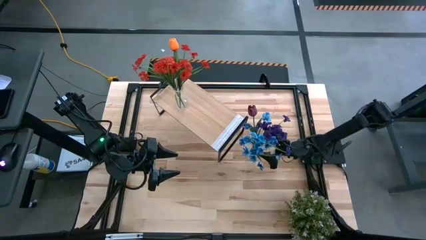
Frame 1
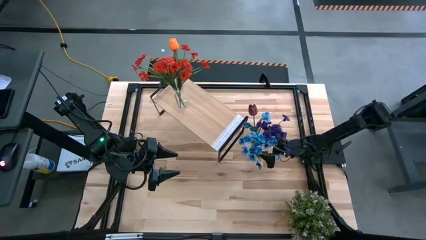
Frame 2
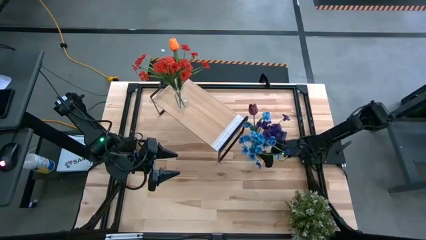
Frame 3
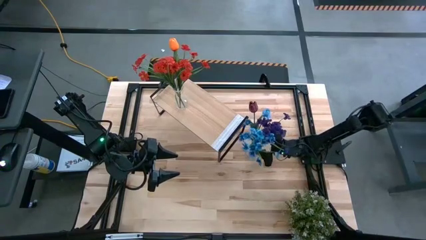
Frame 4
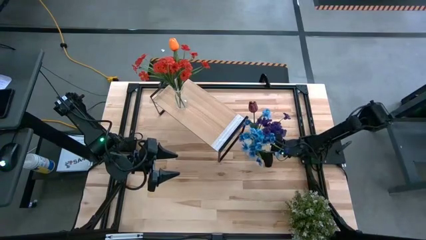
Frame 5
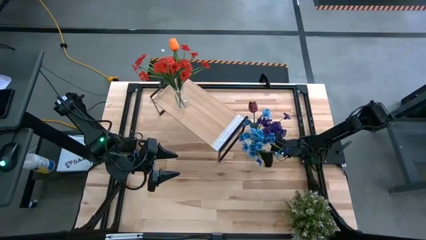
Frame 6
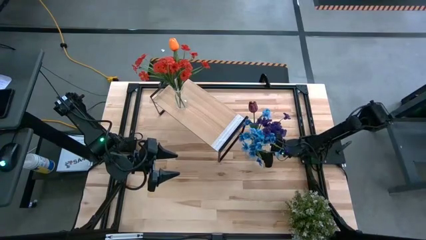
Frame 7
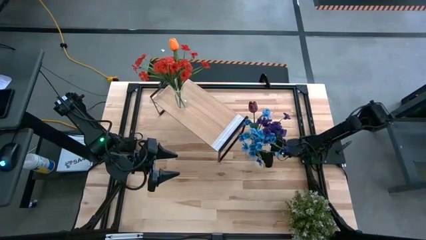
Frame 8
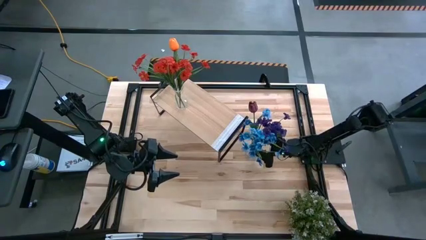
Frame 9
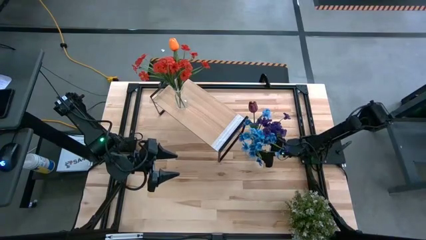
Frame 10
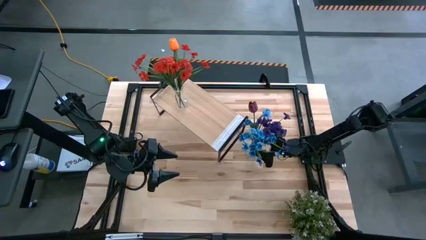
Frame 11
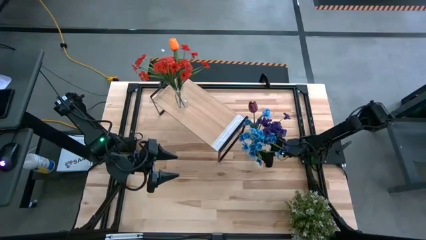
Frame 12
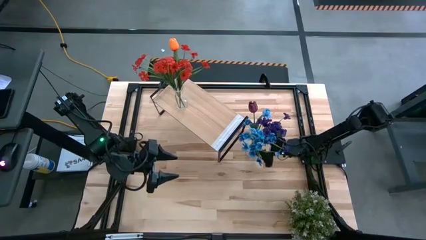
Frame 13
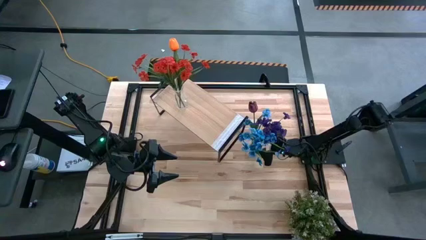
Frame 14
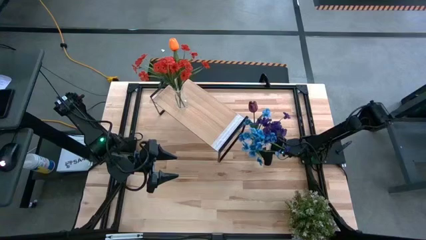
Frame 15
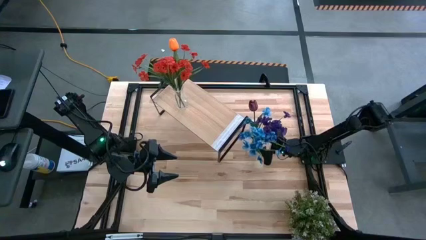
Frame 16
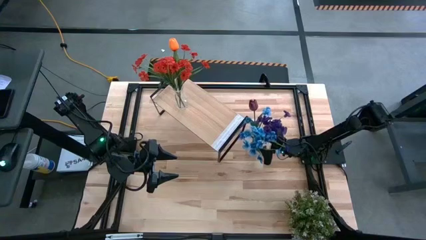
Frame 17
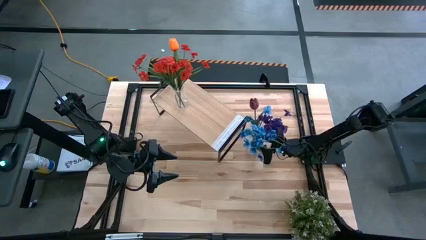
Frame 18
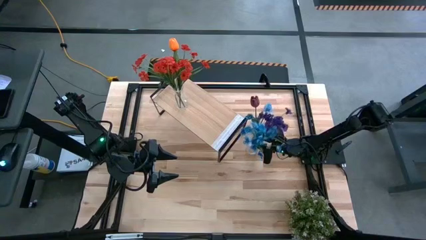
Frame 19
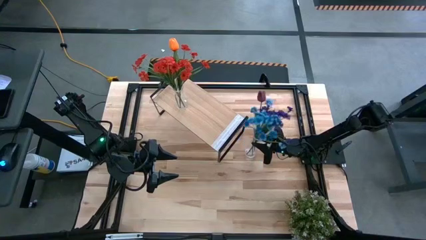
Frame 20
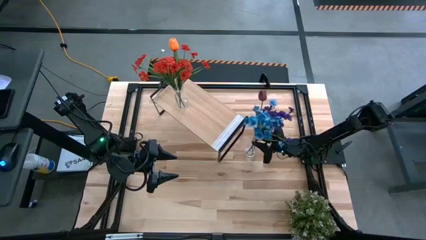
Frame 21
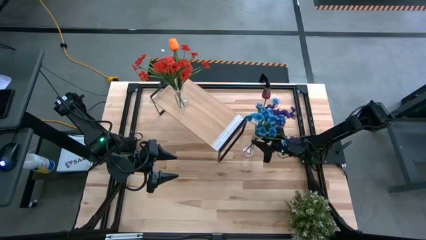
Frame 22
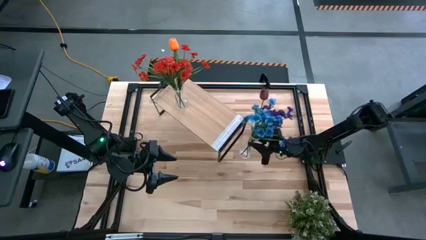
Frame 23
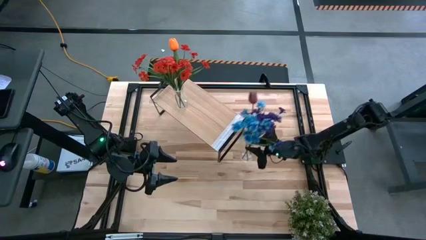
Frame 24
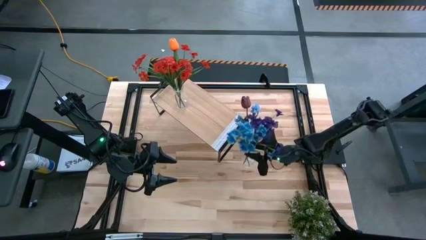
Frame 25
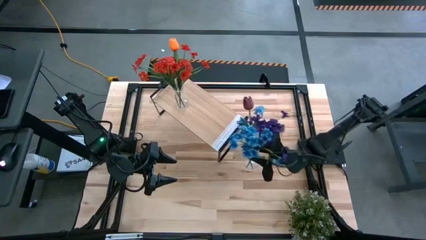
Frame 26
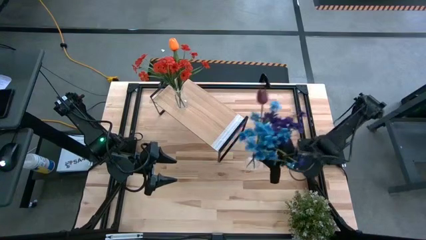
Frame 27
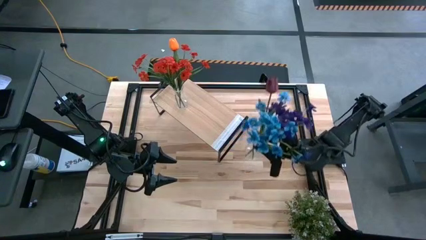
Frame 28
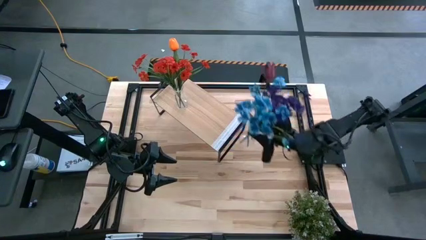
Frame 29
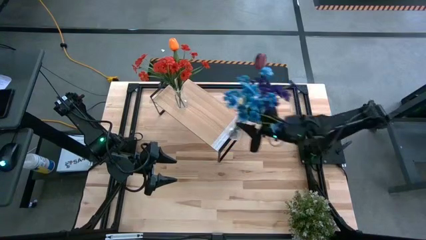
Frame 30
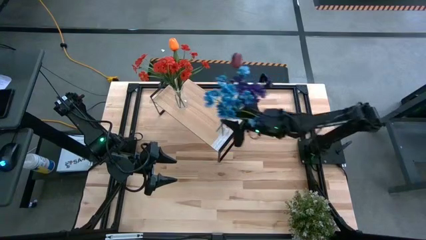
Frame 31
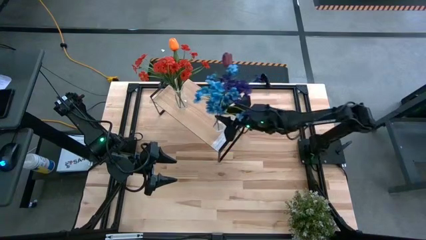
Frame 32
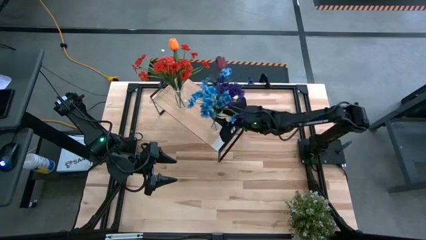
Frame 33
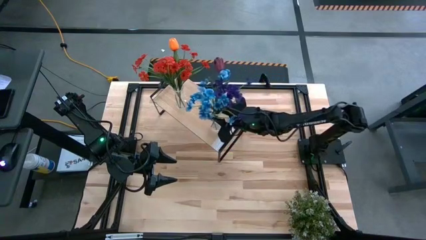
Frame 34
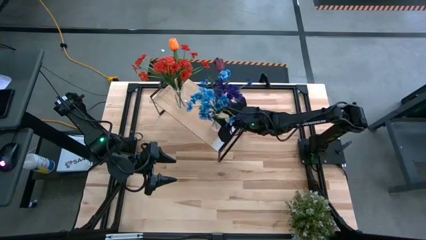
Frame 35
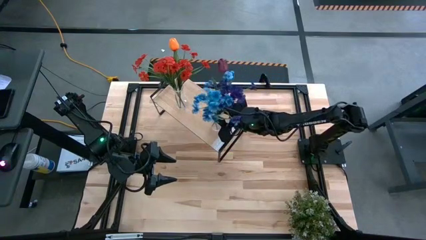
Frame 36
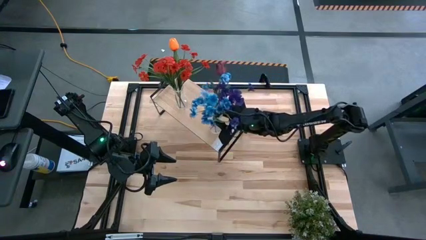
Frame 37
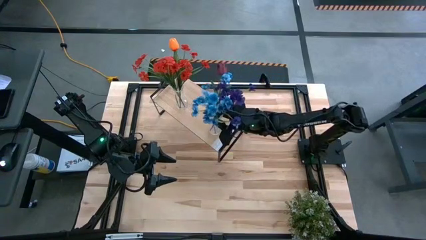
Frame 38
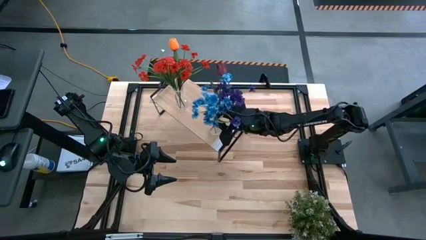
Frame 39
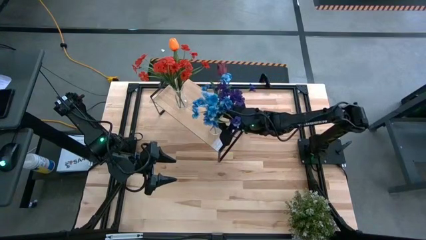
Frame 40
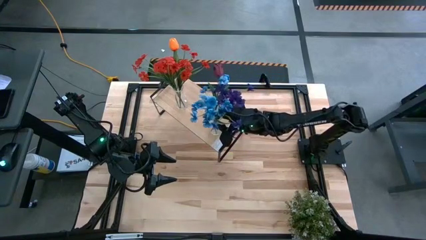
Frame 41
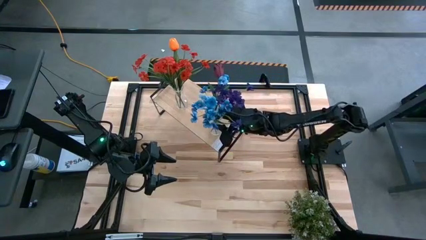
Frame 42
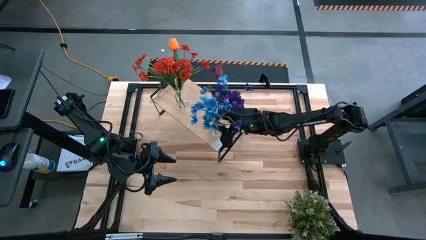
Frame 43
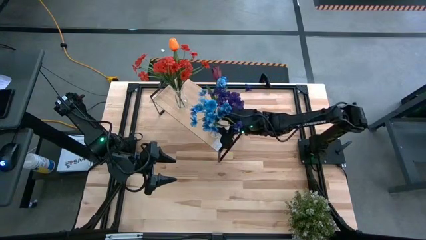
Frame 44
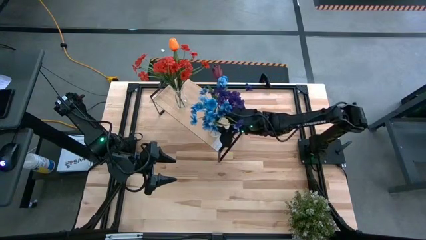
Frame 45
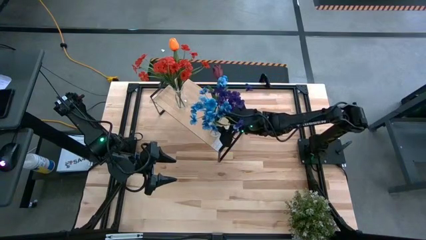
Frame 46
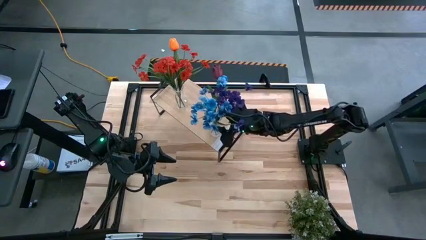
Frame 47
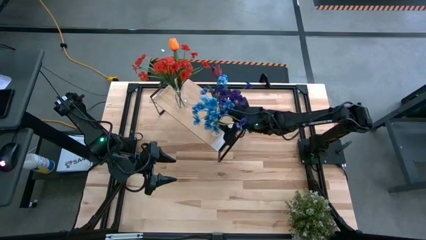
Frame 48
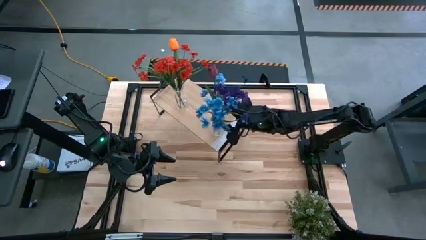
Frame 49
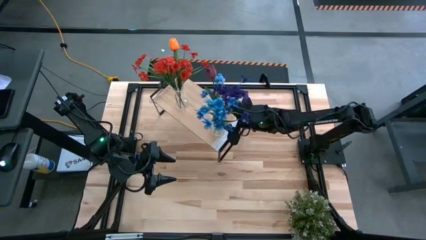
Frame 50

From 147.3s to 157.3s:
Task: Pick and place flowers into a vace then onto a shelf
Put the transparent flower vase with flowers on the shelf

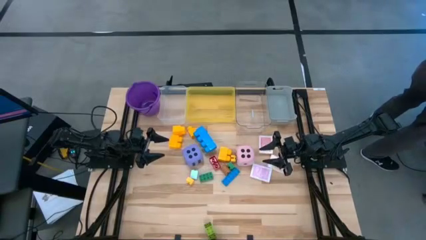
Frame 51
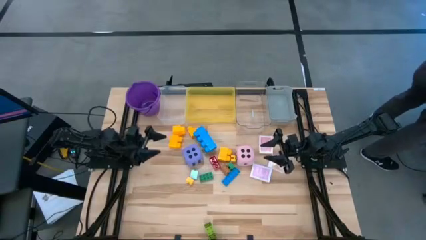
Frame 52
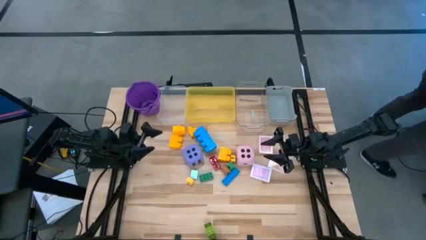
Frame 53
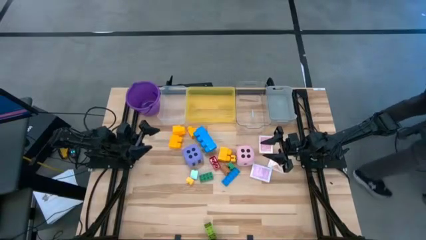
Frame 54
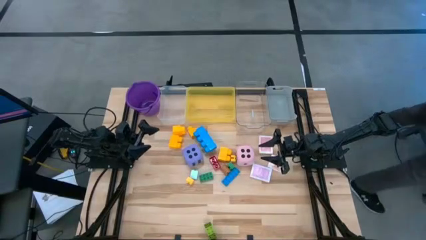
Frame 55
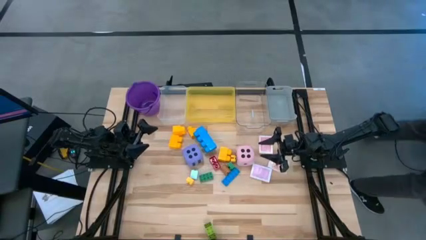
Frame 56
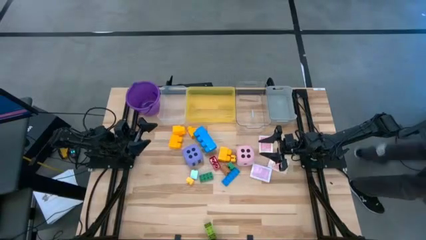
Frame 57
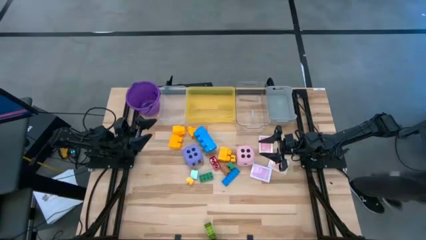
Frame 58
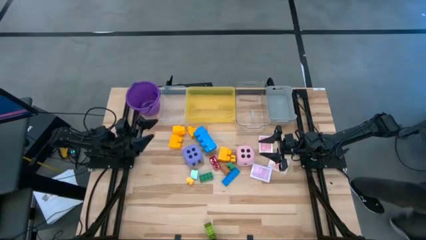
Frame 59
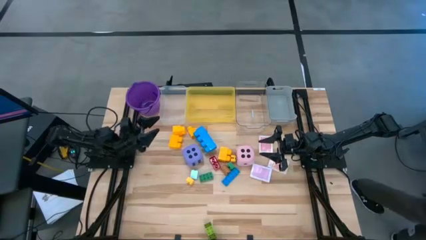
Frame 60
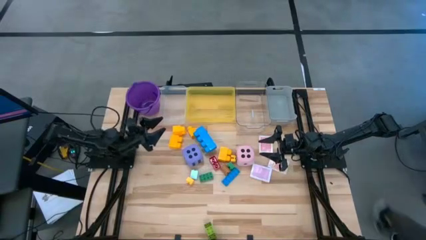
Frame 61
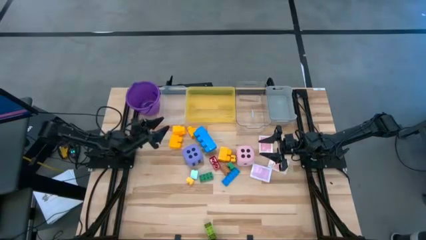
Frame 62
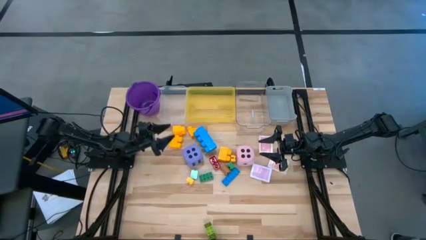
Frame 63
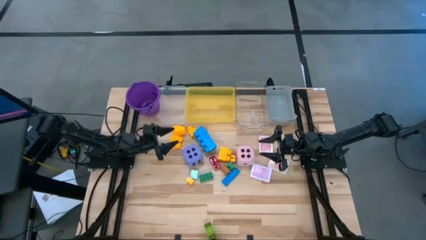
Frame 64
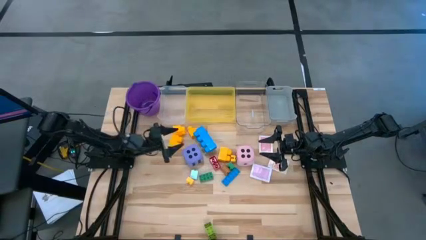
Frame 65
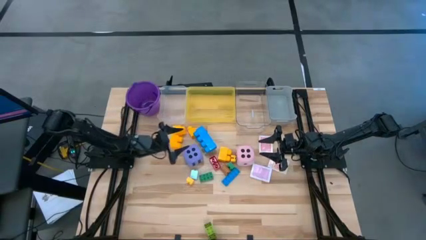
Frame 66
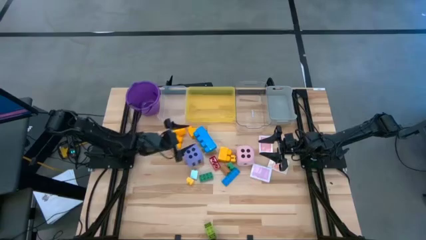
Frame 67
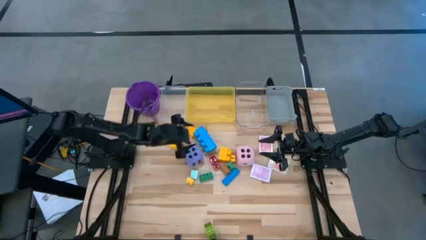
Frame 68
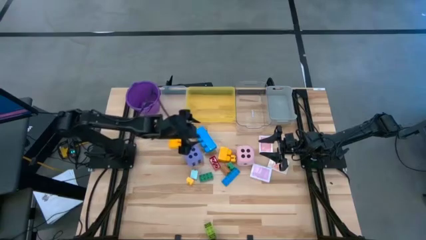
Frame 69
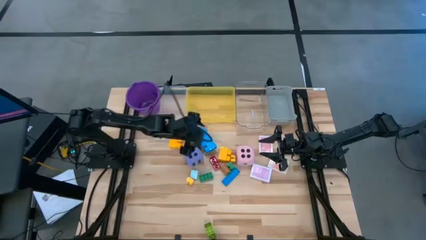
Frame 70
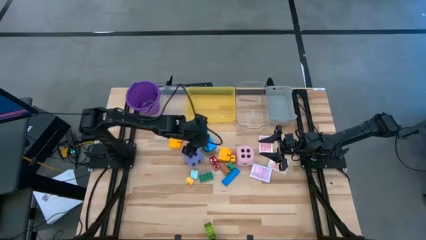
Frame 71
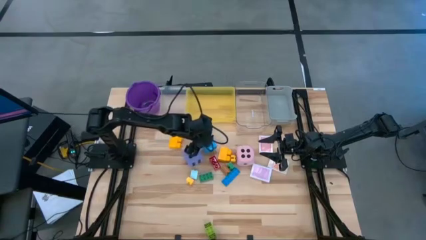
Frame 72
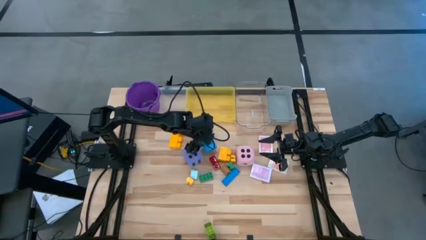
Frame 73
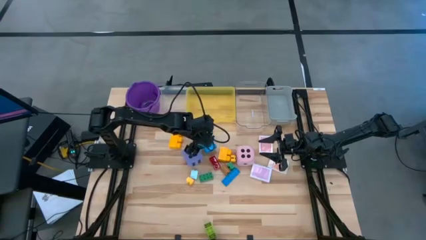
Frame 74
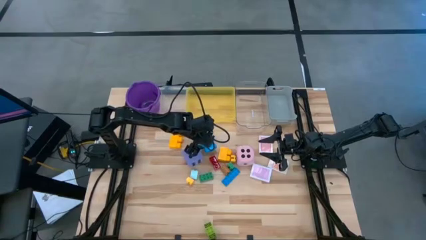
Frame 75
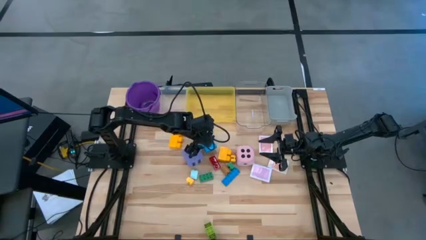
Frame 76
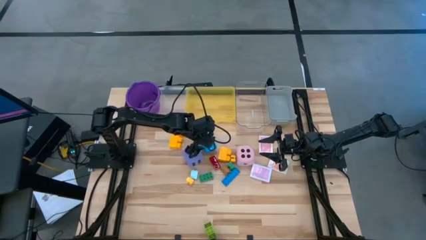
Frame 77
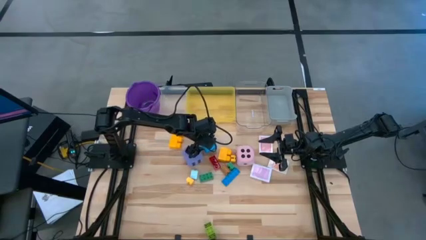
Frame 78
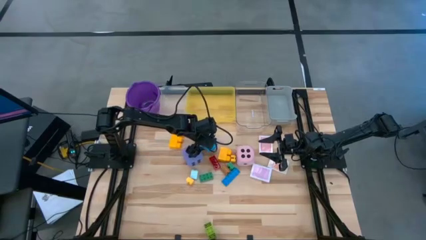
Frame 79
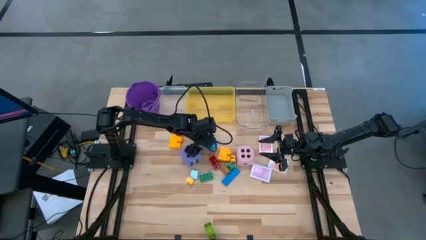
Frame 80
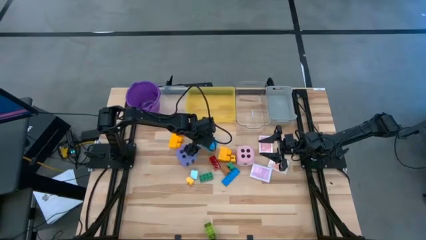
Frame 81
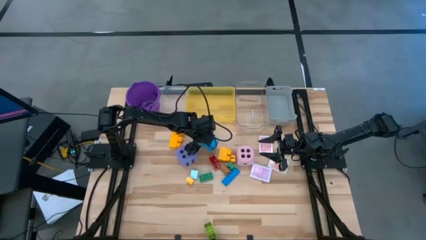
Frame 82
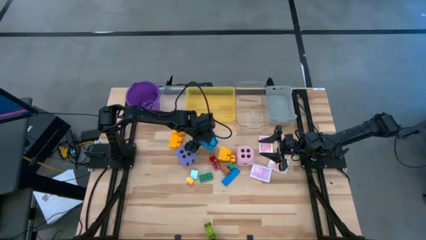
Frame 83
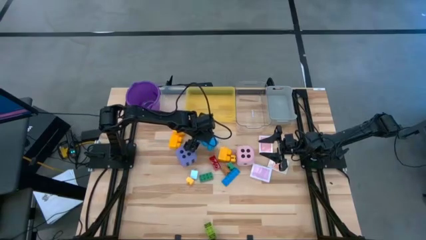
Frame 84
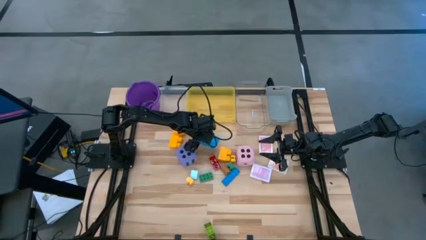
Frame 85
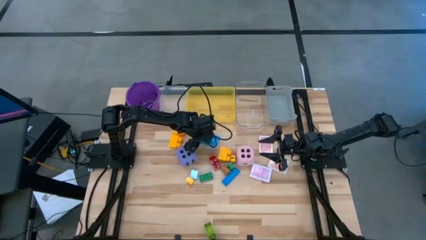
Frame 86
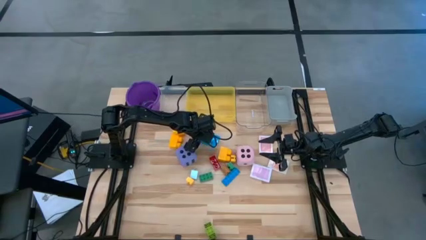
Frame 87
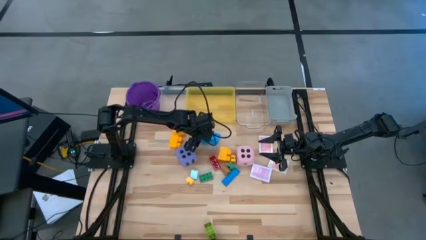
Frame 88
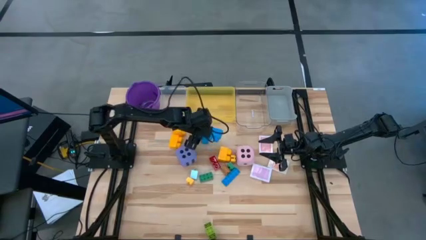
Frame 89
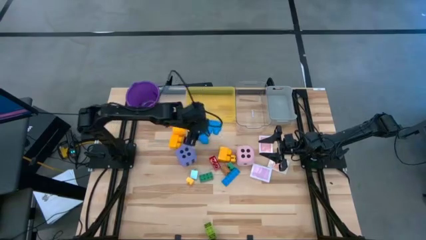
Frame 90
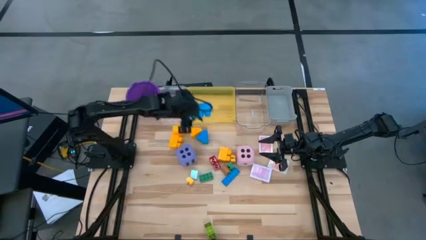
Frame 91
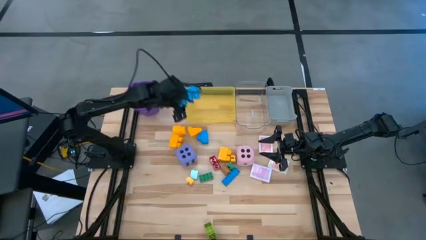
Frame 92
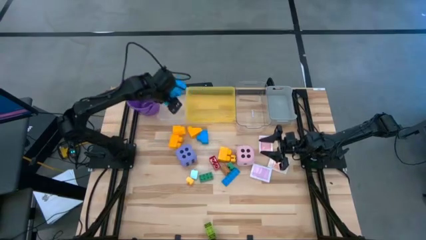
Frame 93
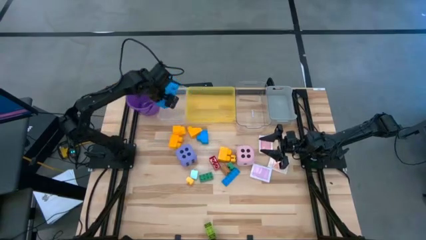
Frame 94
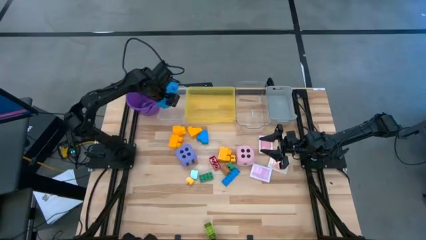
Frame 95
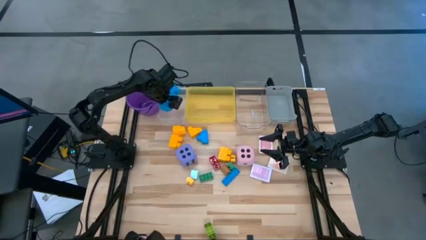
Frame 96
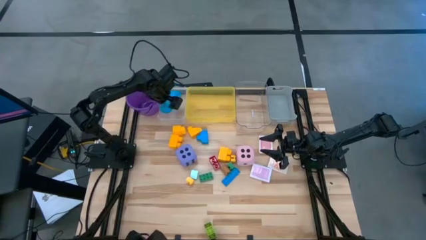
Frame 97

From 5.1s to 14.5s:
Task: Pick & Place Toys
Put the large blue game piece into the white transparent bin
